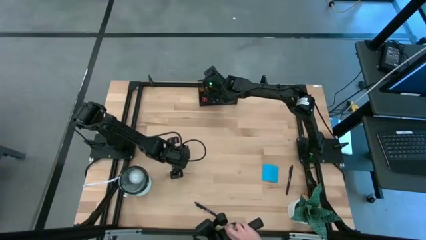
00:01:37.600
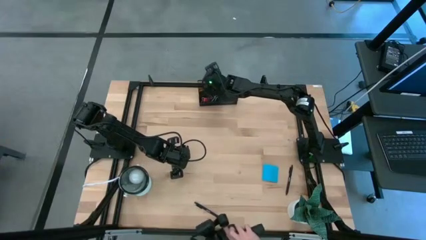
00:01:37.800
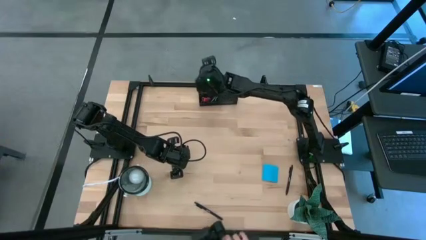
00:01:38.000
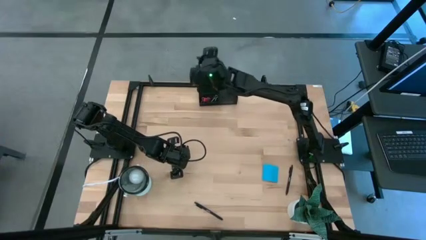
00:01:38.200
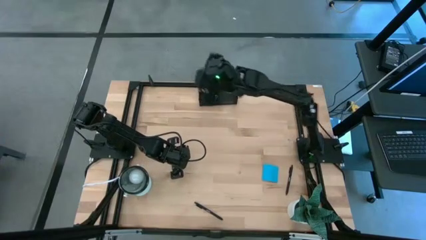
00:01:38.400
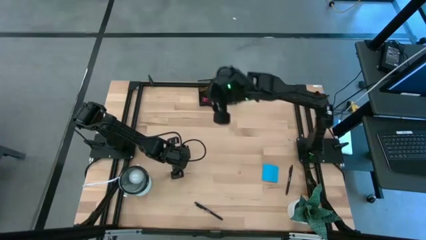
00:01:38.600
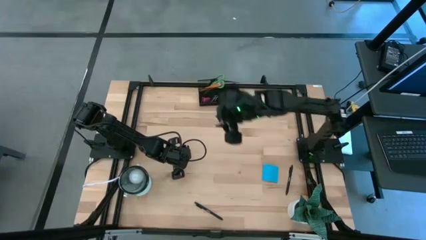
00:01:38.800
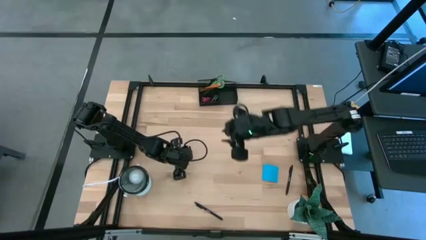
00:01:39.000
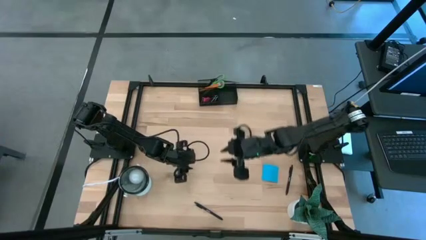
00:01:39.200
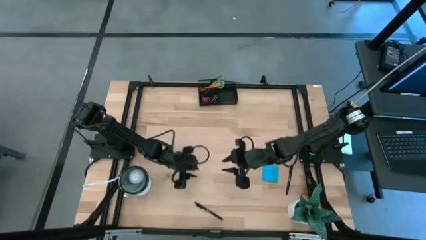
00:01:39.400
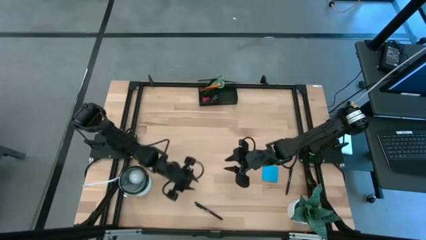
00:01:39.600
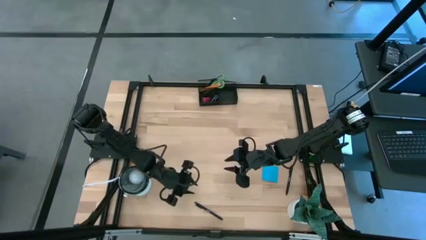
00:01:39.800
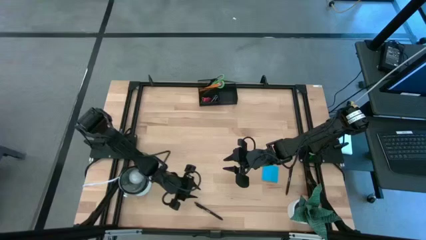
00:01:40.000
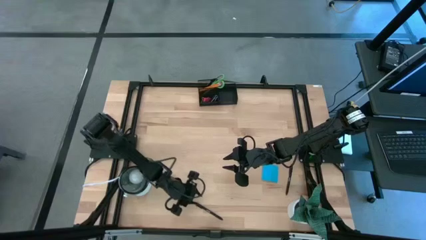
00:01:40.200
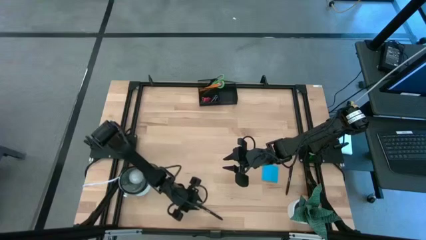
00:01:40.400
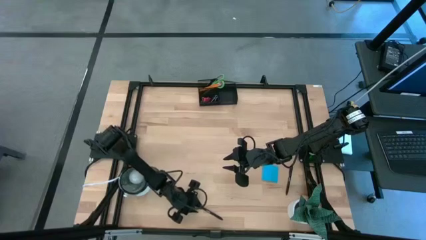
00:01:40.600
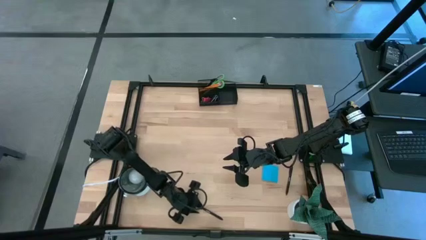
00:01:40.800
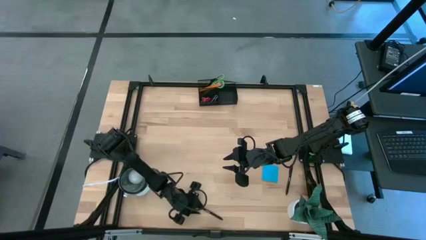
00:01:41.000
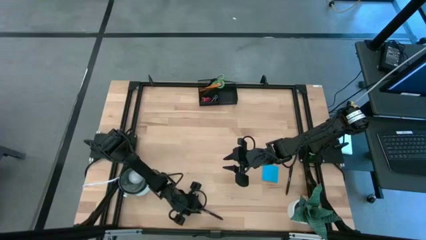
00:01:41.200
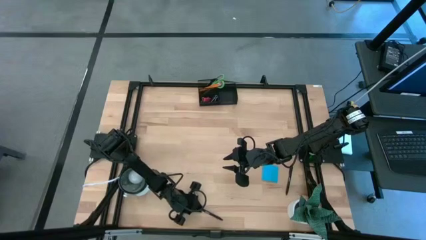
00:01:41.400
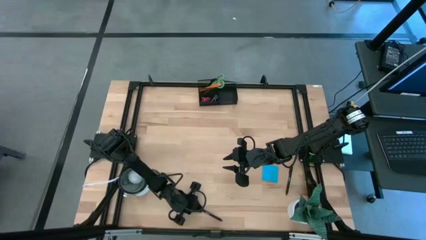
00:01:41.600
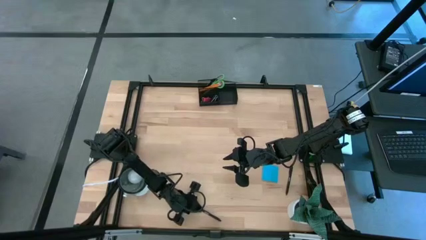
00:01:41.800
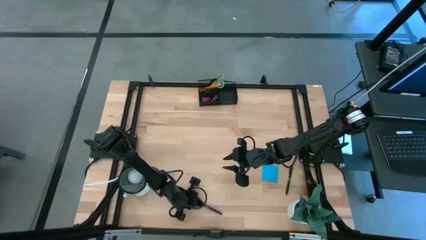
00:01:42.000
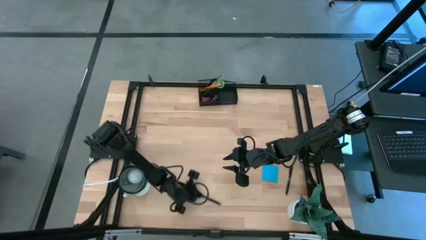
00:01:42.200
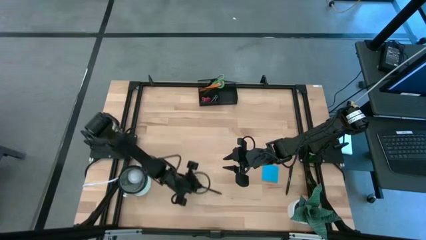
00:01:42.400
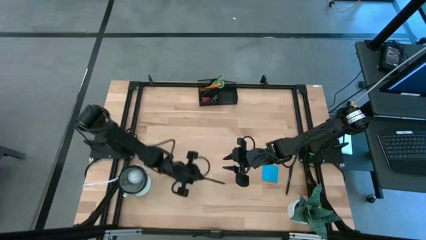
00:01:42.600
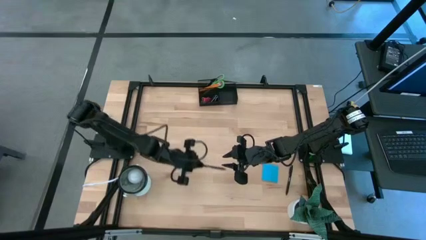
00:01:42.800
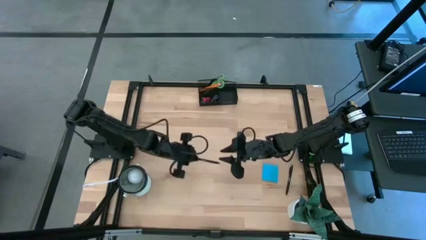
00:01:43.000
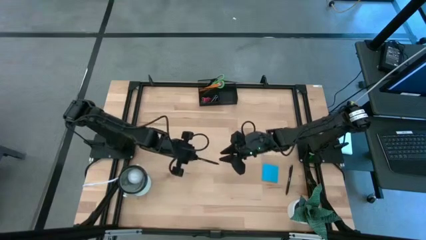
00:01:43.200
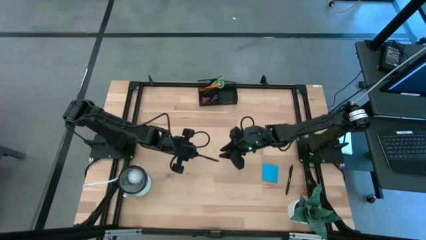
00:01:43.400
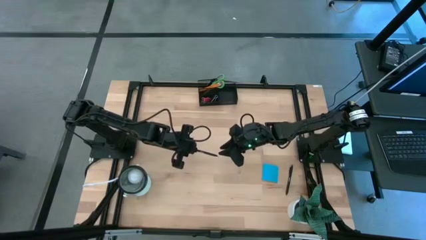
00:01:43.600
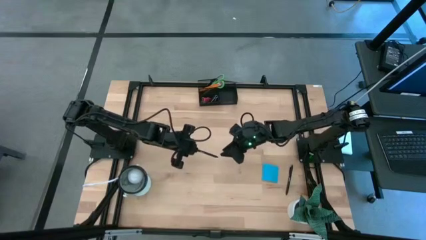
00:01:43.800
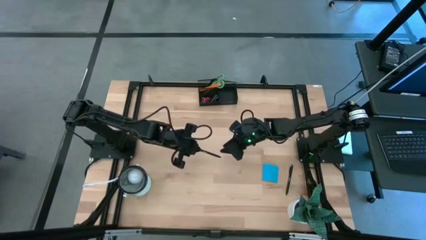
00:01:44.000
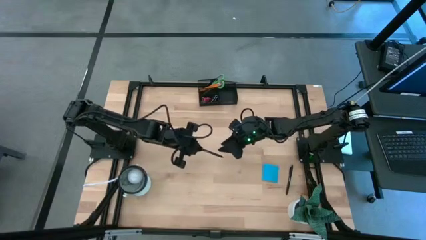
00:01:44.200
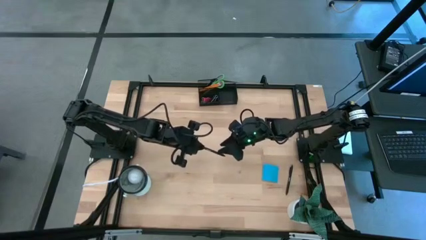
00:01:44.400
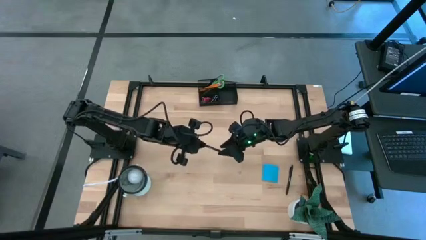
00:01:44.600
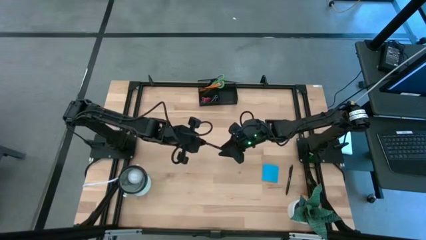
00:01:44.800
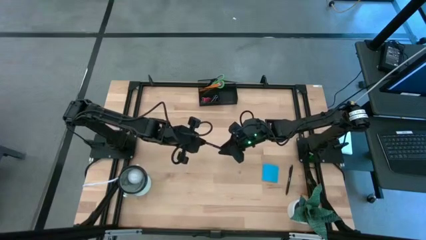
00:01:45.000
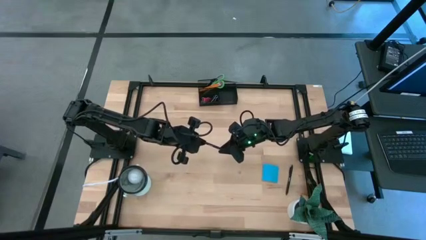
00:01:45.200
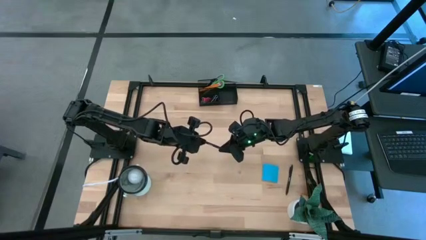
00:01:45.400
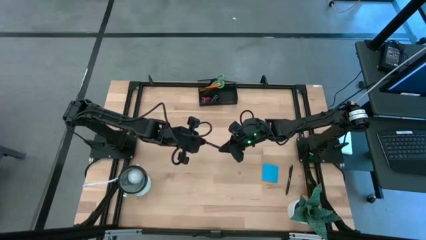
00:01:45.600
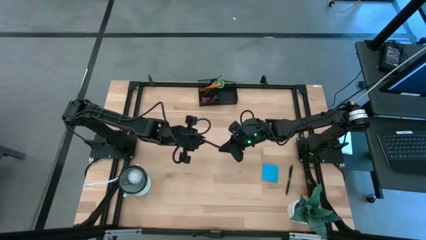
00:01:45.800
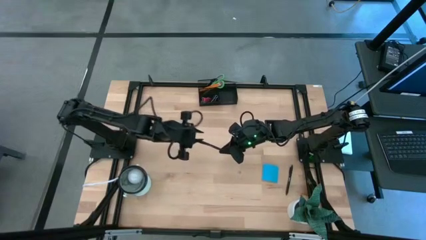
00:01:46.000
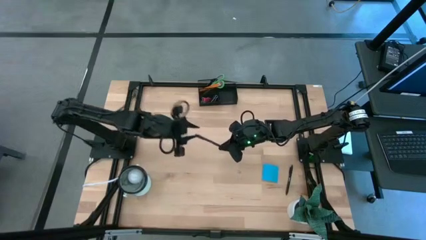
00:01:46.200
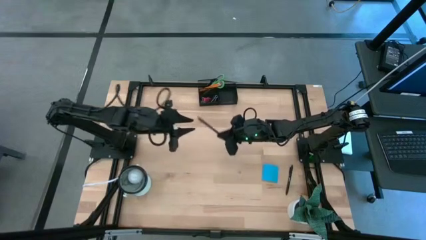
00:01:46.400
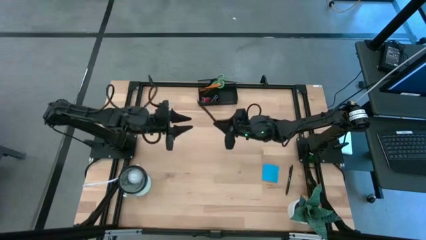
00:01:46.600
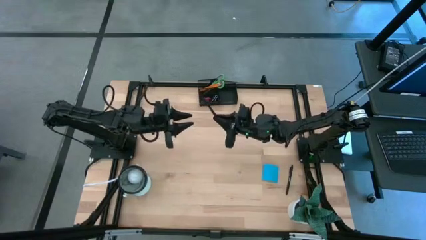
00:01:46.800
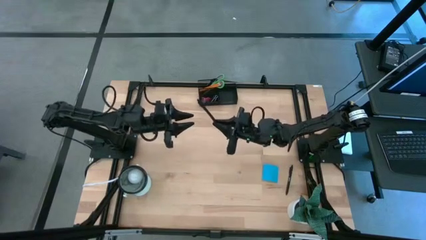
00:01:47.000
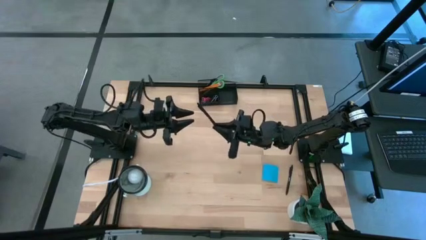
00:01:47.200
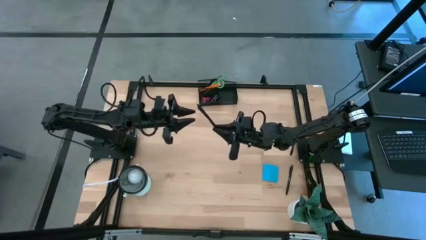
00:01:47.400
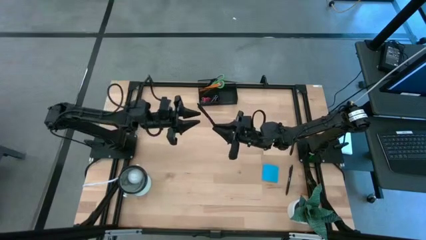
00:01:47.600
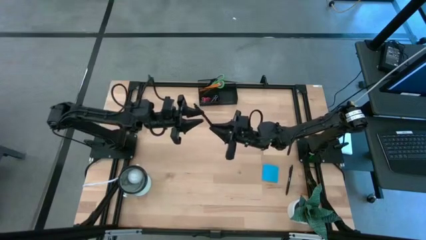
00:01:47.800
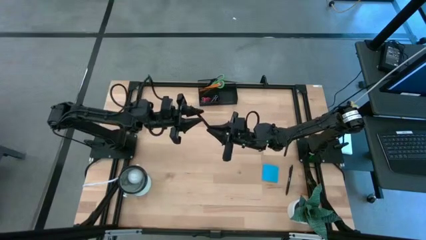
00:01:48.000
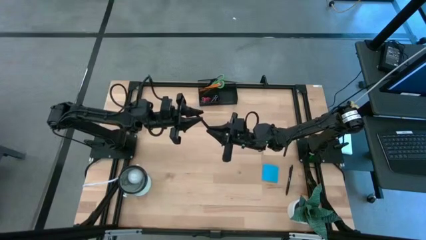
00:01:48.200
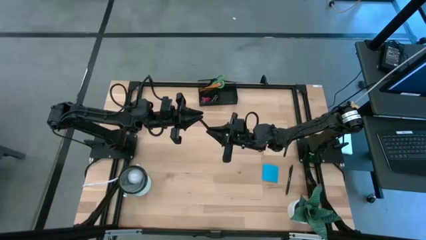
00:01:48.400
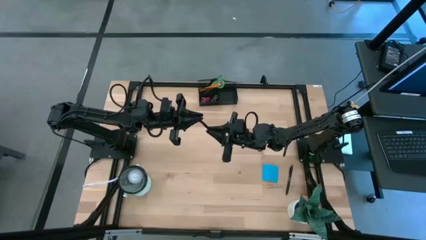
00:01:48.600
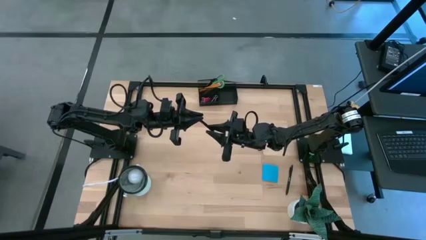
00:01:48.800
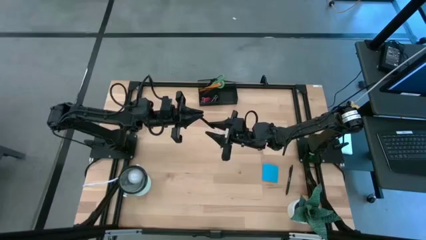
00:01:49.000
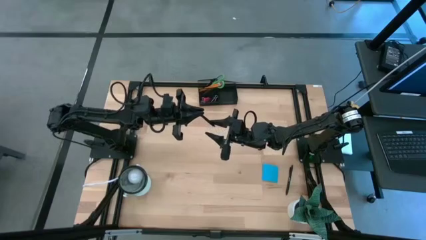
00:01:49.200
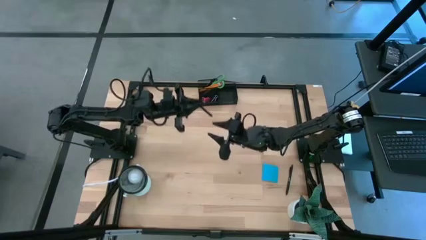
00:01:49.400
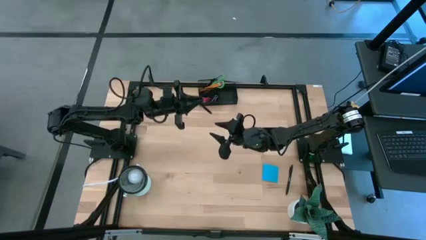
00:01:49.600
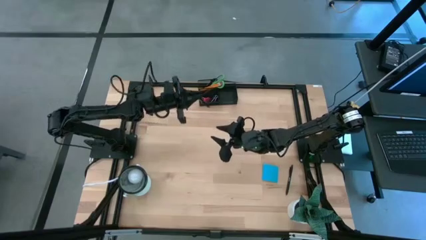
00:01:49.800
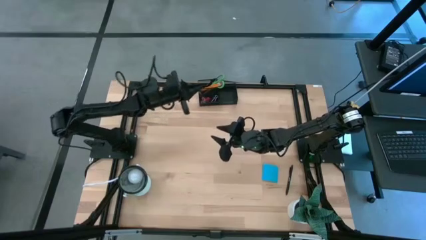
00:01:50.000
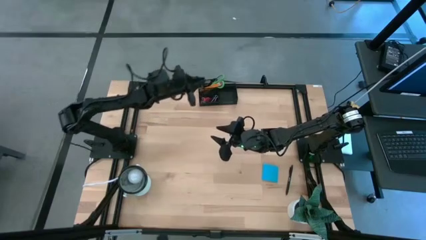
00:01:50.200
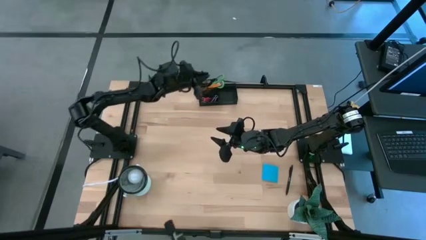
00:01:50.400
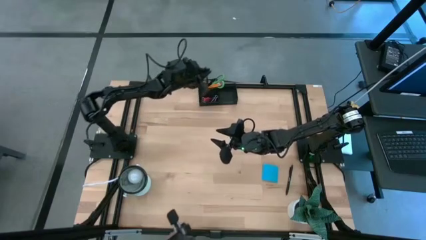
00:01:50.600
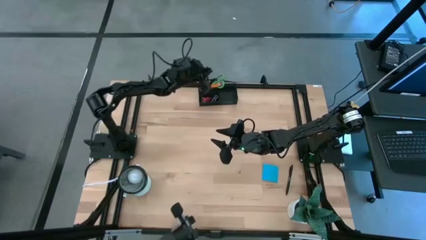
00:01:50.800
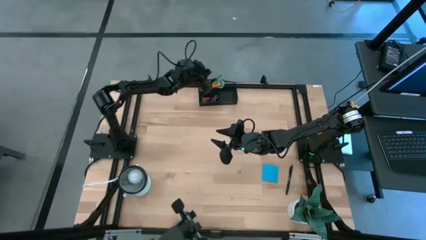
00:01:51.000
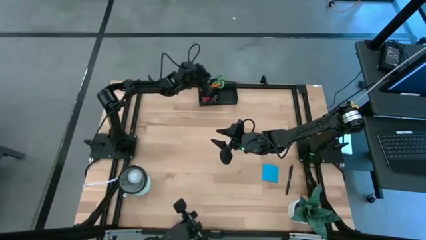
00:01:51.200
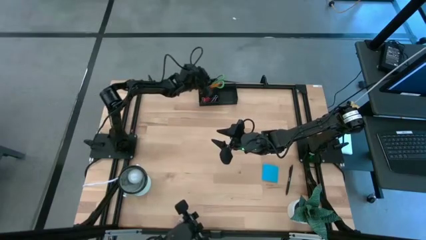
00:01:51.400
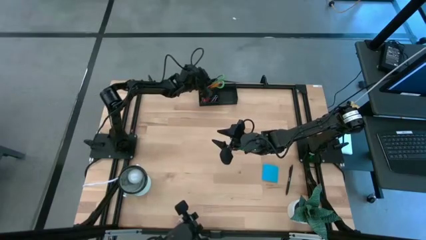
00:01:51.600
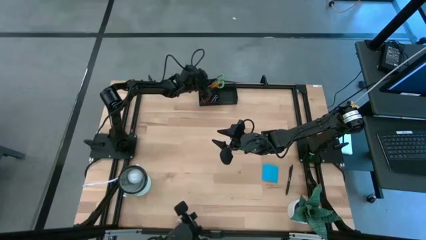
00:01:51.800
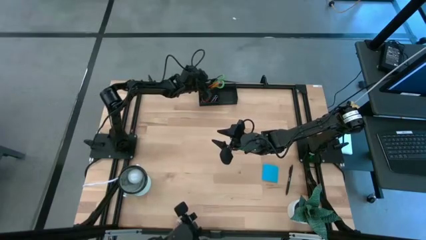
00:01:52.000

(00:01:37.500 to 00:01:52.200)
Task: Pick and place office supplies into organizer
Put the bottom black pen into the desk organizer
